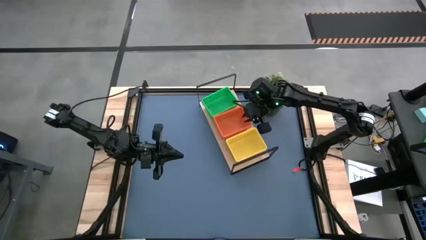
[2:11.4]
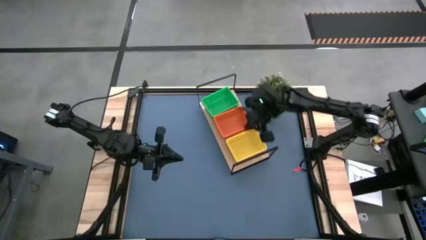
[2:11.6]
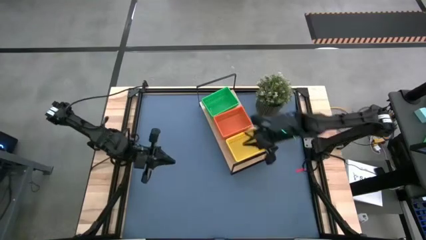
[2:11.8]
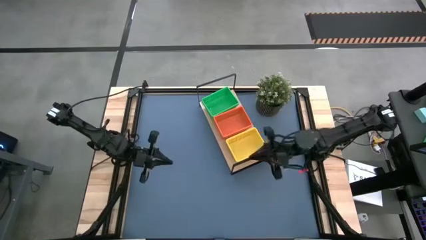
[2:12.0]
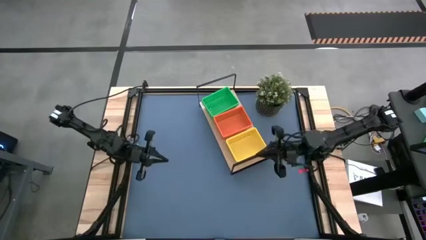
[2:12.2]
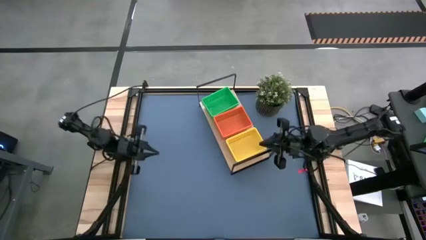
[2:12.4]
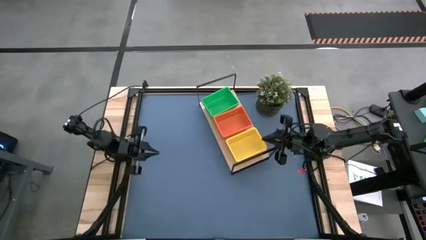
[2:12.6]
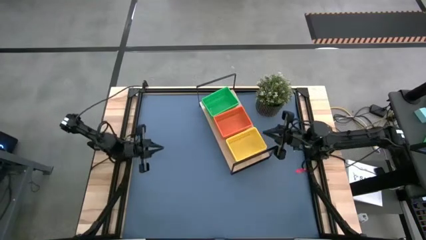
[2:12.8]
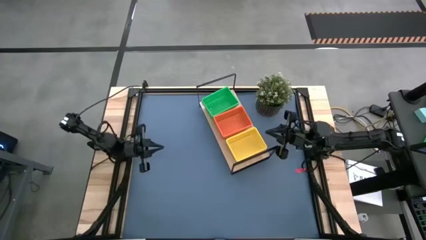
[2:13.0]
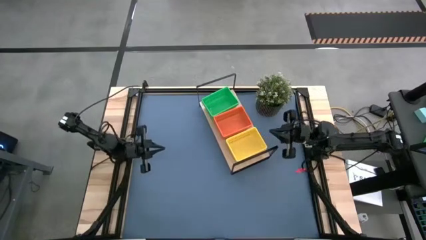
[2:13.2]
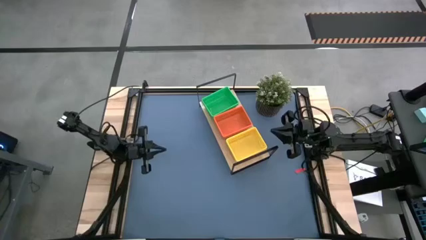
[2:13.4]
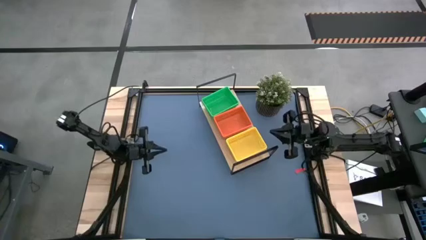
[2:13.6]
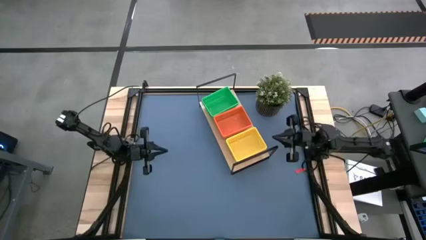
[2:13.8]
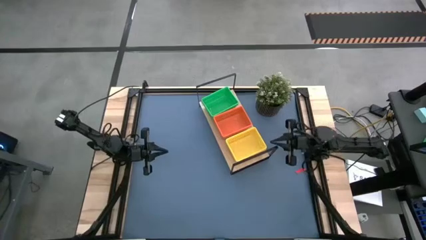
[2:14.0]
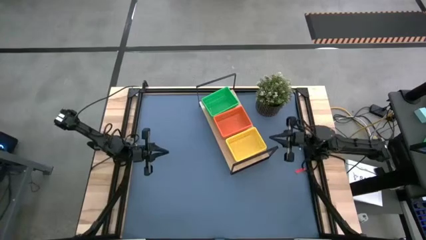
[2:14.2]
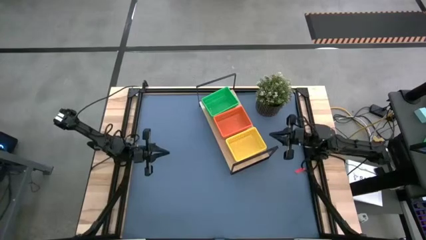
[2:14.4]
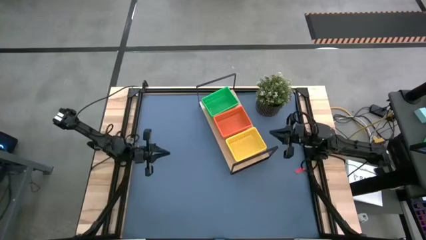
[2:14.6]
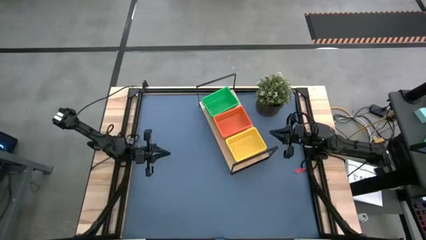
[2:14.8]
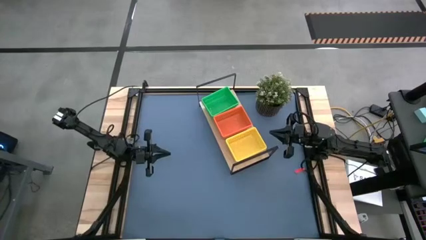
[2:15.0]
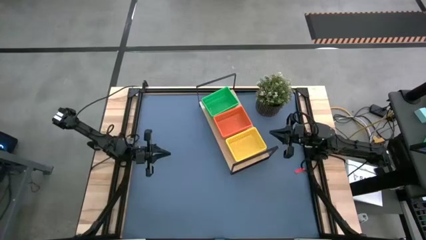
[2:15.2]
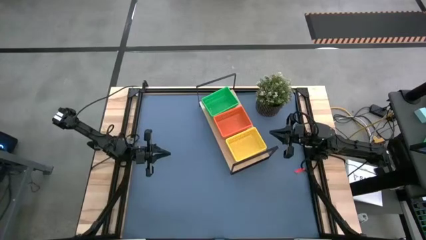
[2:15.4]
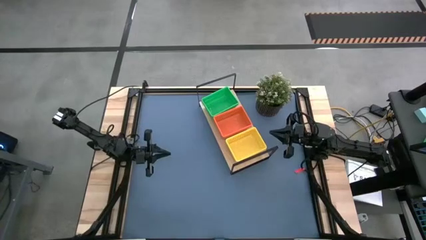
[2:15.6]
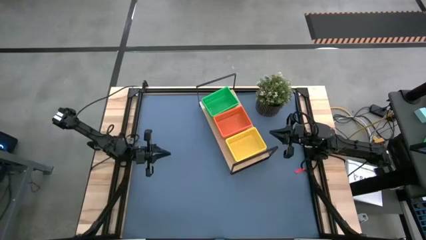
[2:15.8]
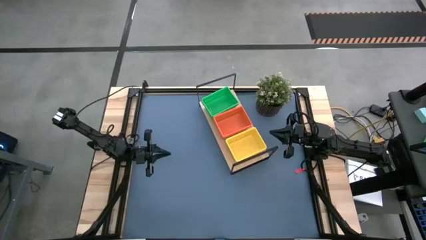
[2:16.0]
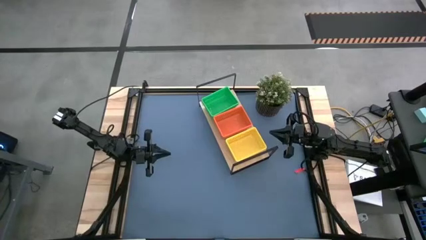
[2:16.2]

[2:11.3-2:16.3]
Task: Stack baskets on shelf by color
Return to Home Position

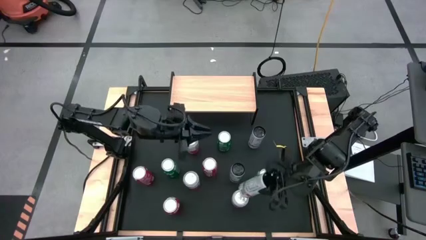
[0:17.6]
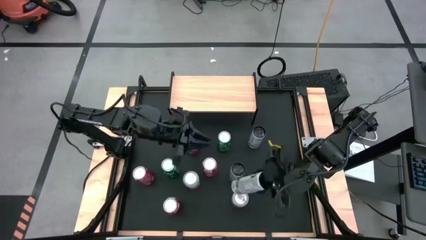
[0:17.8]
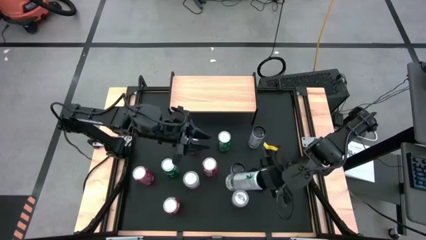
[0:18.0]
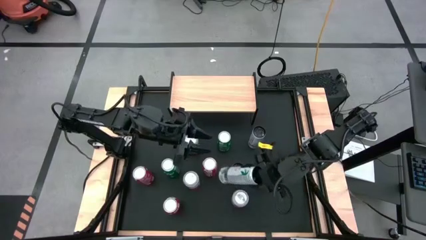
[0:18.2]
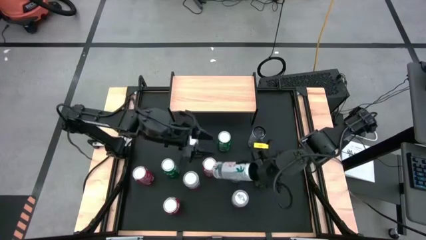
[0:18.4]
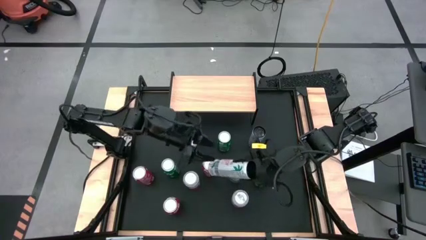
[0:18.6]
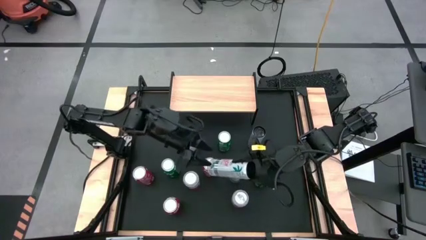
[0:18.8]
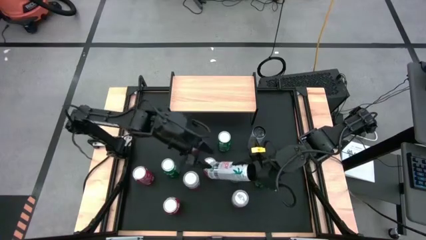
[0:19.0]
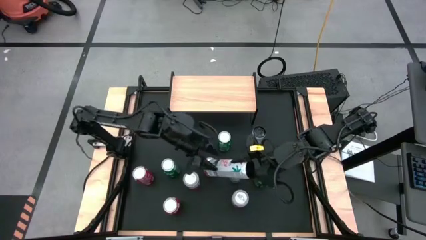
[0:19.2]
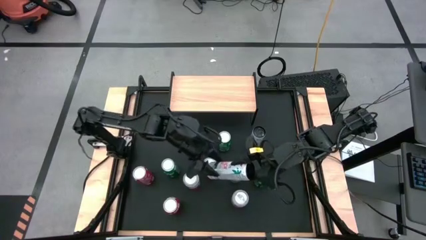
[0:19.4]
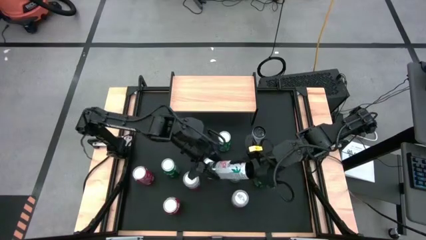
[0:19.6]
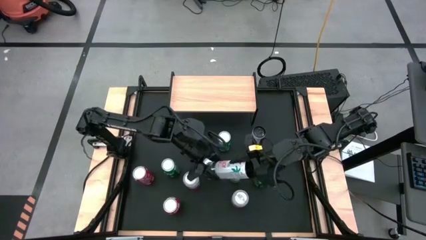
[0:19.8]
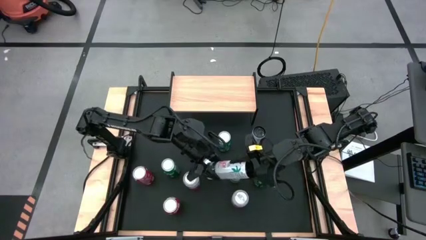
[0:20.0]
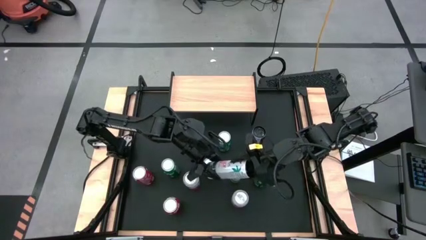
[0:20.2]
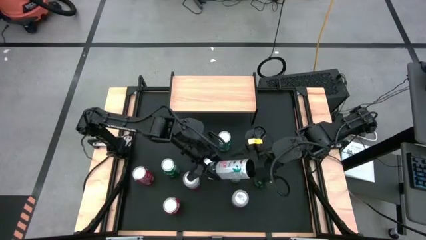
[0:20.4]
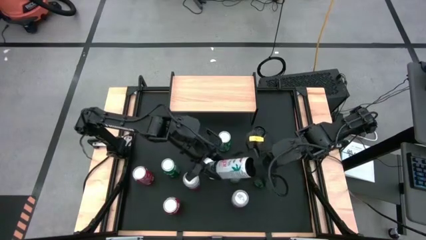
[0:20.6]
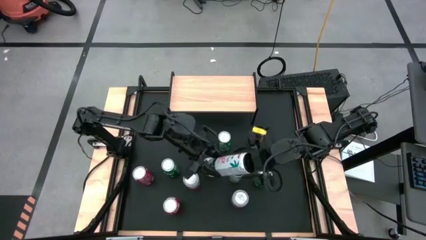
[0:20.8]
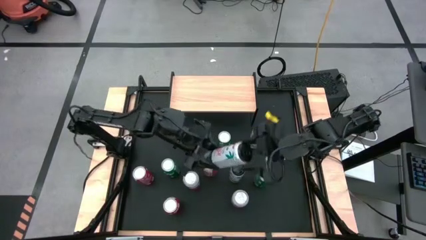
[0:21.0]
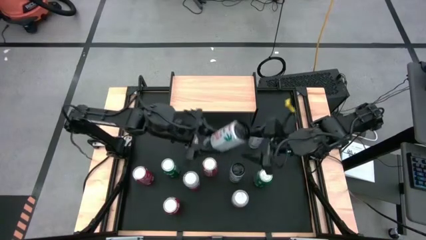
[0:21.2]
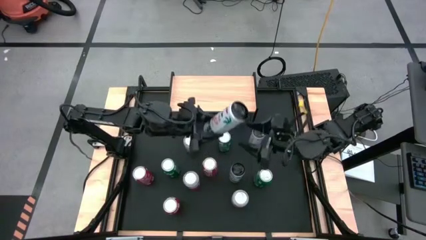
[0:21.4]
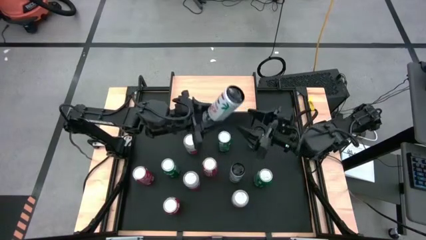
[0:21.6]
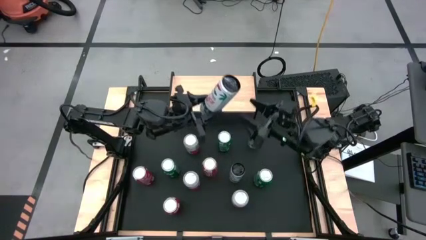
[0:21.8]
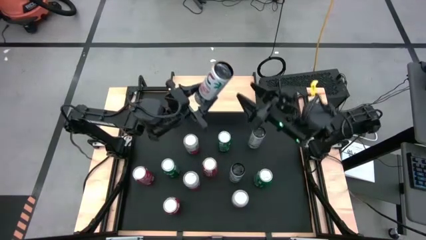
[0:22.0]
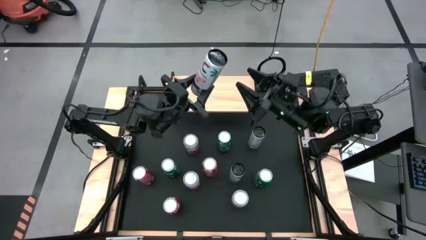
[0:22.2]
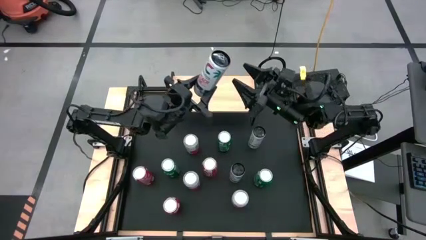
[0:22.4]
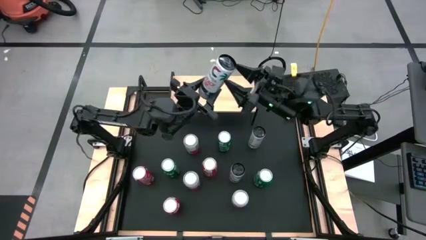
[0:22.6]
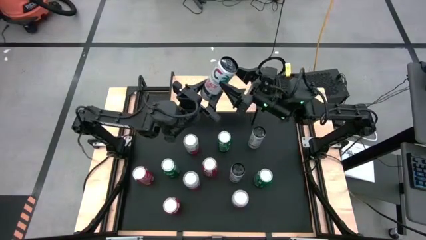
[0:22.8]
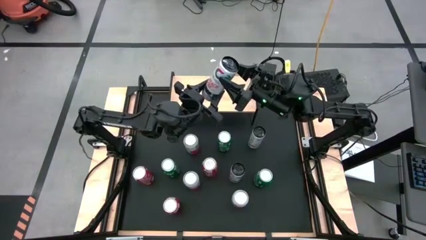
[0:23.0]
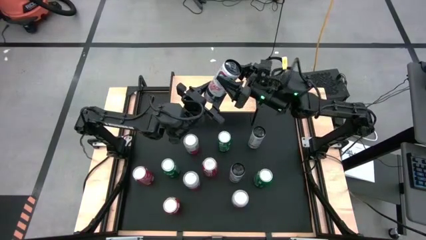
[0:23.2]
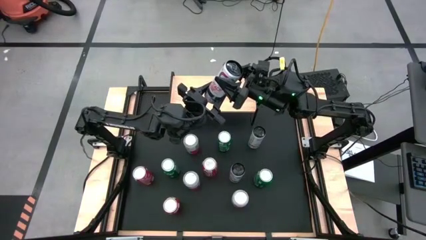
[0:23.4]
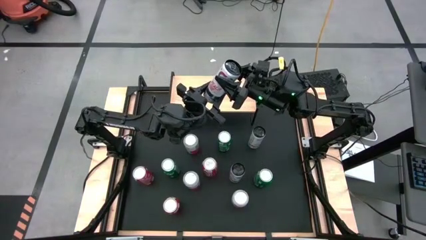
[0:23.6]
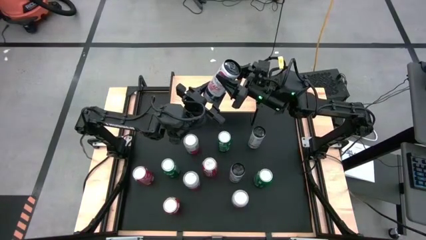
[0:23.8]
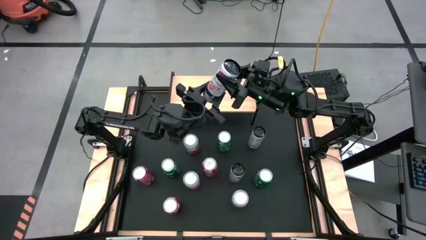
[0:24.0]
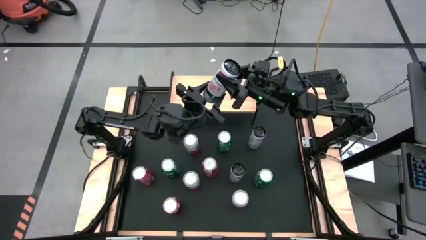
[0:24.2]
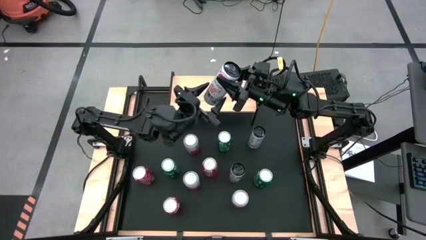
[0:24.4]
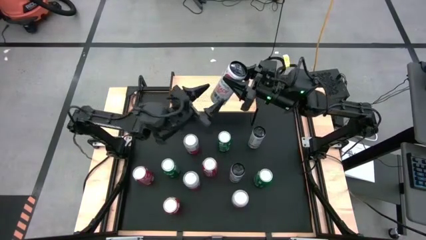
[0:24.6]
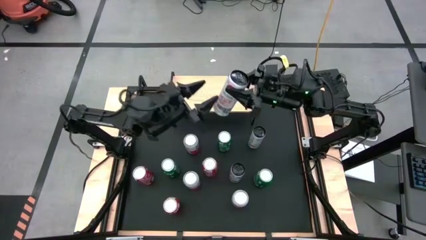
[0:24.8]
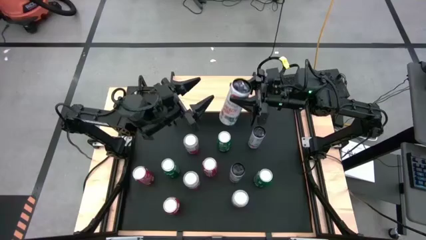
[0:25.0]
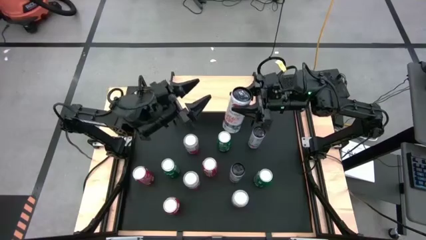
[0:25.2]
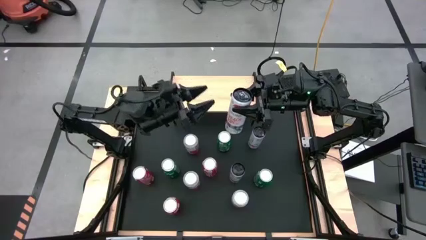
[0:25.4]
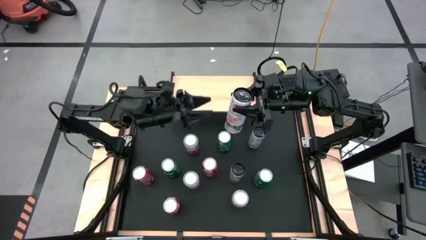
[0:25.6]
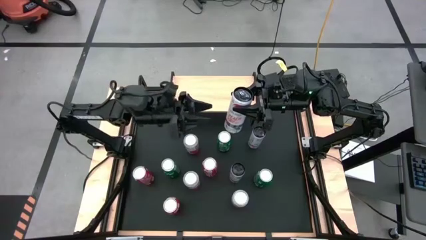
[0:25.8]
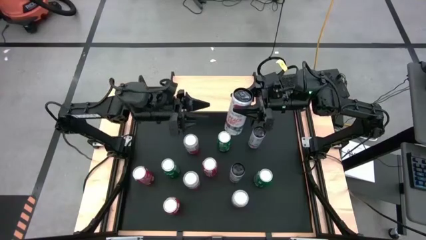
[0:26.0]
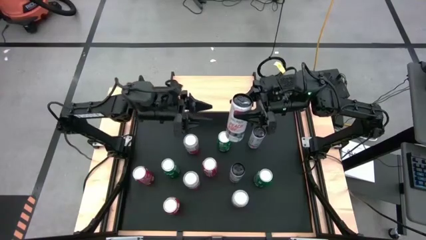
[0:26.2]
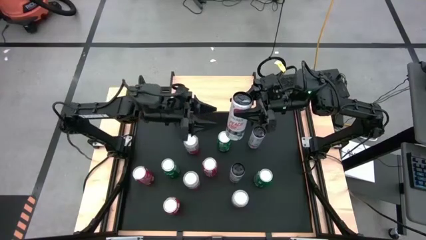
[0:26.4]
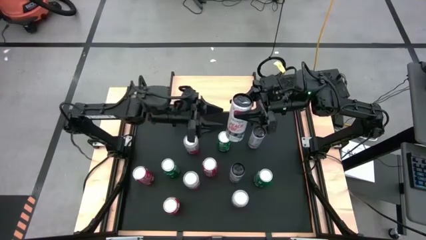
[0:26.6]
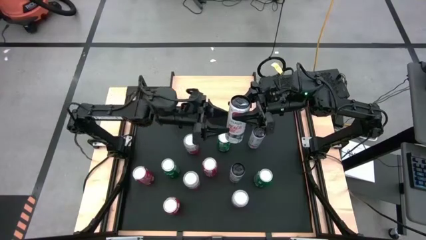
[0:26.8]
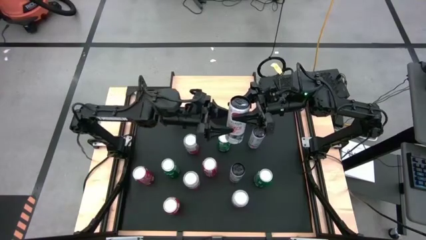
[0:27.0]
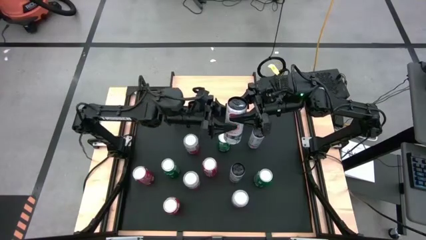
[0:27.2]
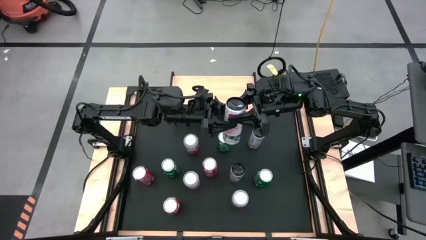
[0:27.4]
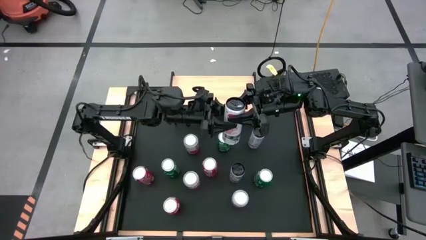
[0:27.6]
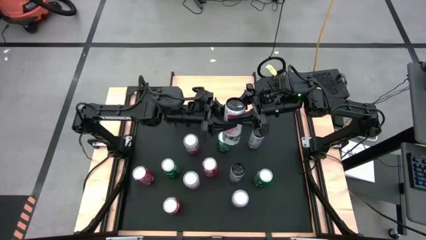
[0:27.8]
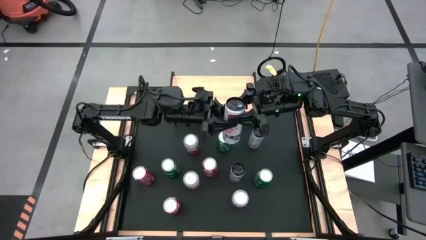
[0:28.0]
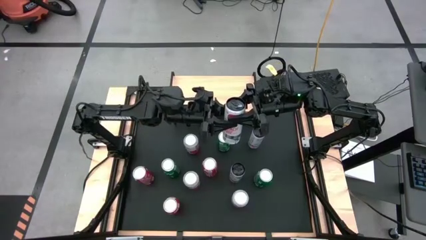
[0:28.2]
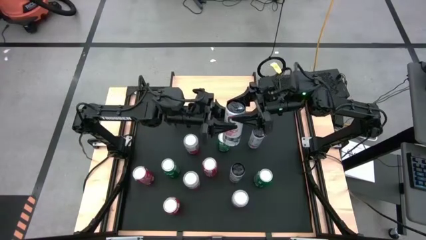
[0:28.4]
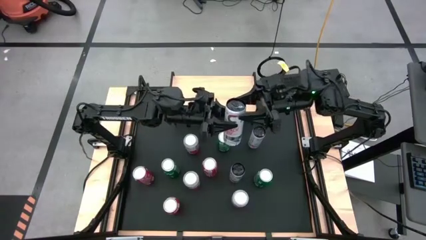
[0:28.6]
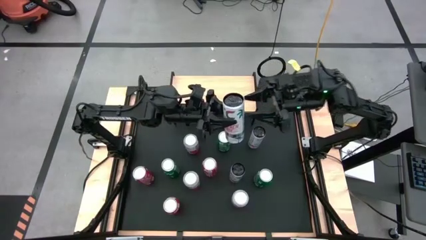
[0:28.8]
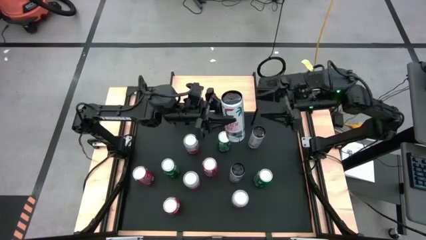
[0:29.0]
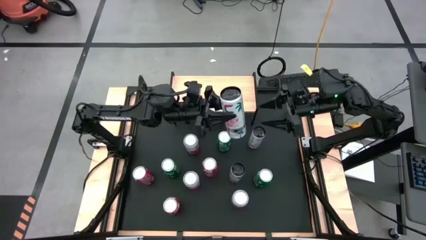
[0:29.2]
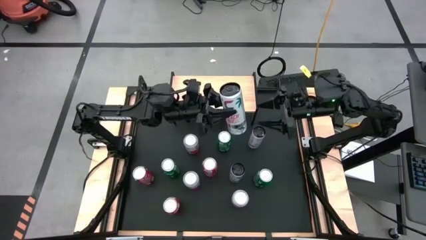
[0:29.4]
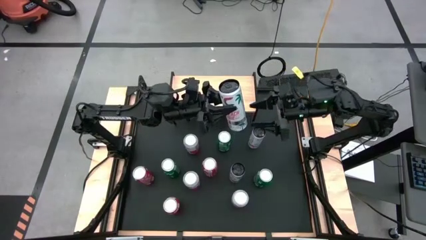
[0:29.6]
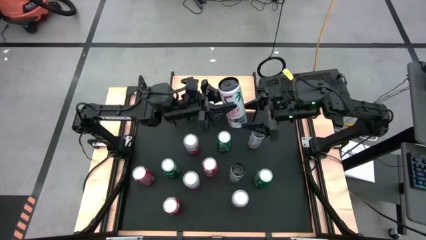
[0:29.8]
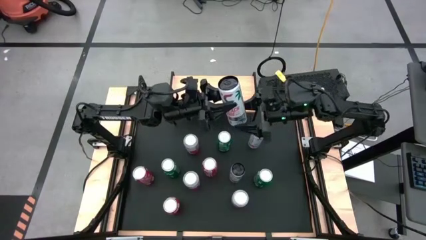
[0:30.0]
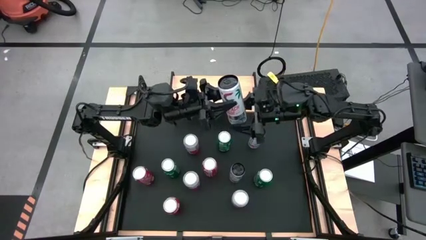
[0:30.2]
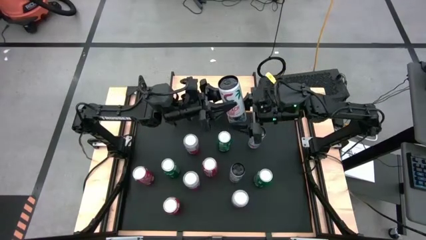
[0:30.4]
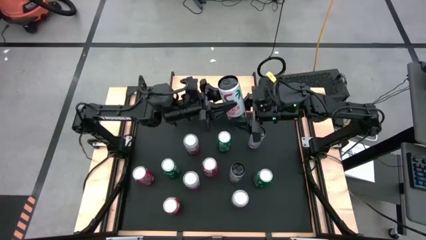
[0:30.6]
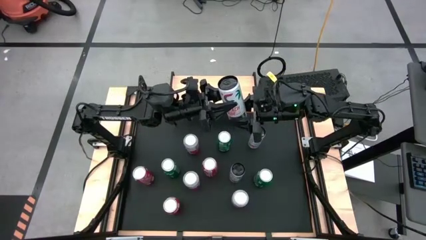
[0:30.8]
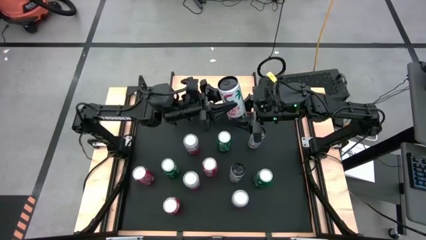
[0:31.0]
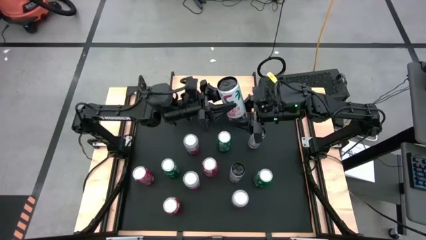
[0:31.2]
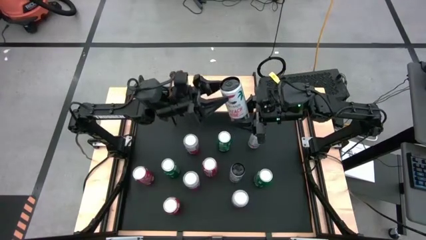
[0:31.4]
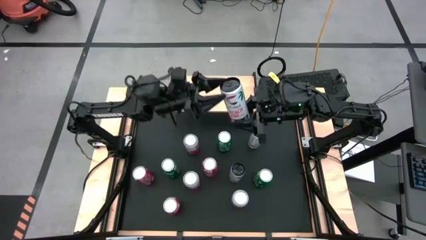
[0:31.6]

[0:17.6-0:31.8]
Task: Place canned beverage on shelf
Put the bottom right white pink soda can on the shelf
